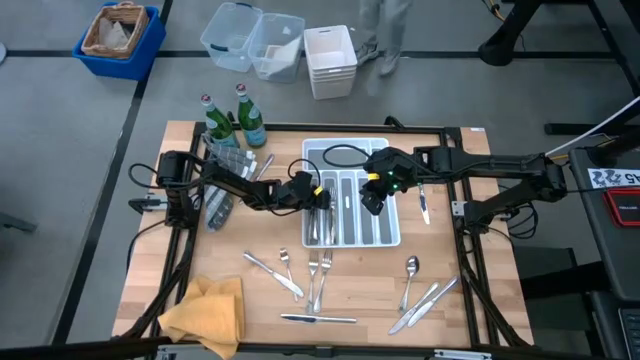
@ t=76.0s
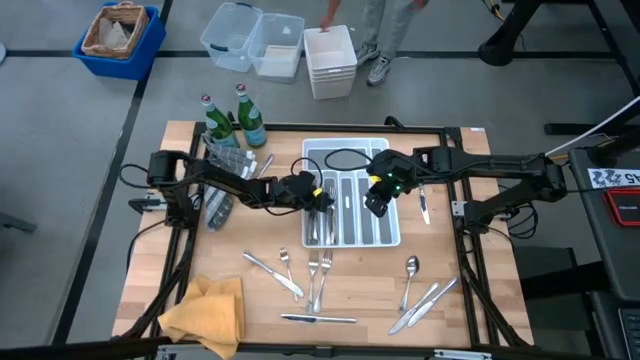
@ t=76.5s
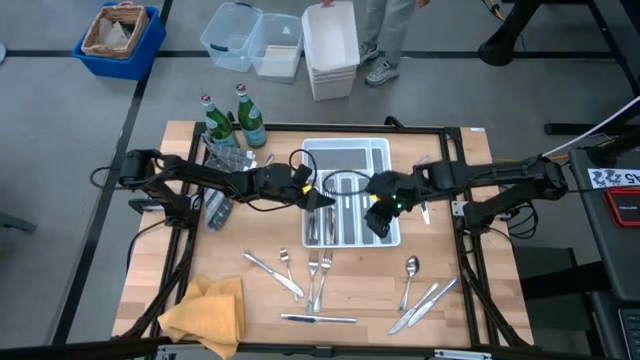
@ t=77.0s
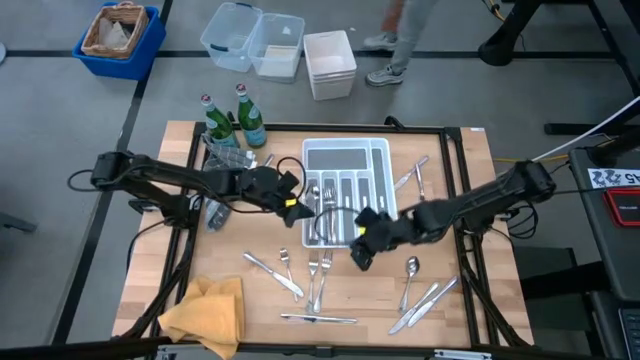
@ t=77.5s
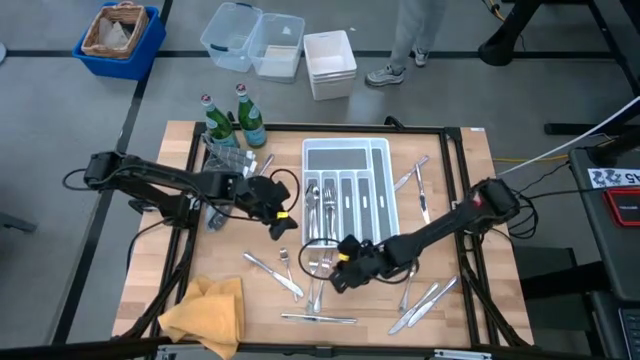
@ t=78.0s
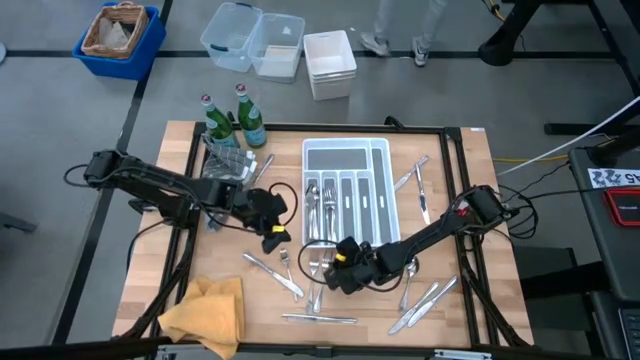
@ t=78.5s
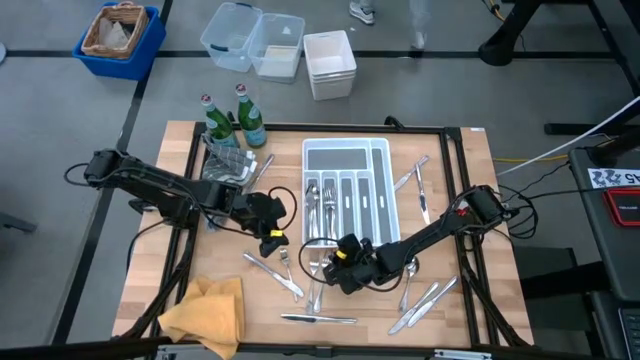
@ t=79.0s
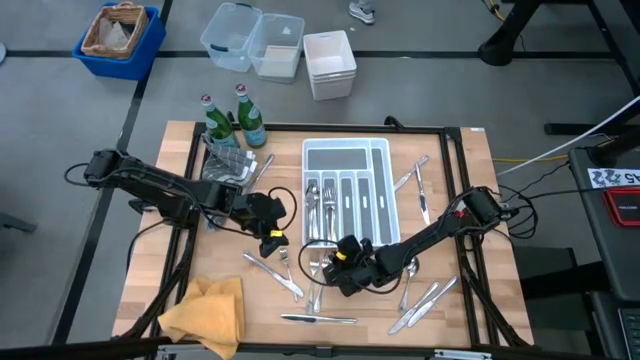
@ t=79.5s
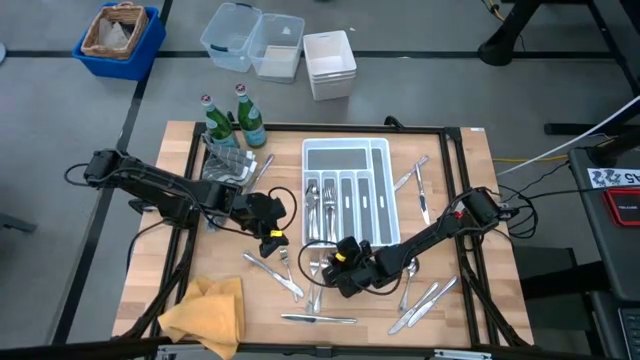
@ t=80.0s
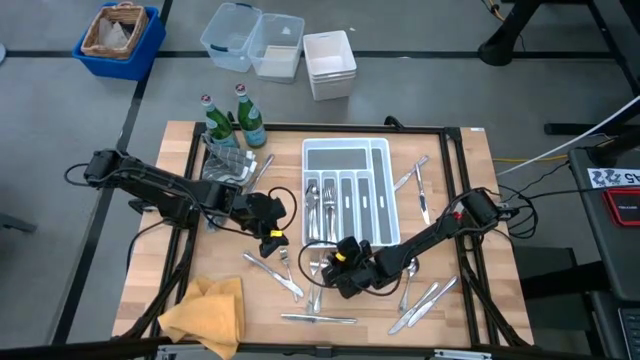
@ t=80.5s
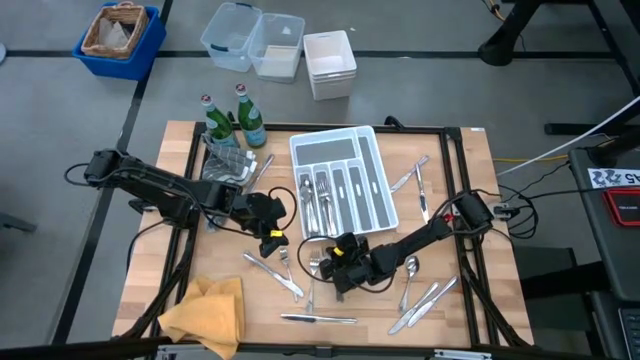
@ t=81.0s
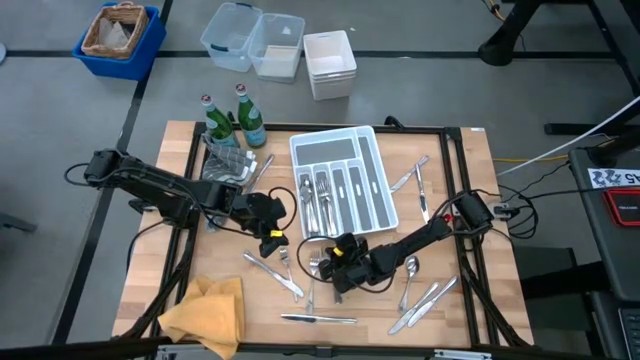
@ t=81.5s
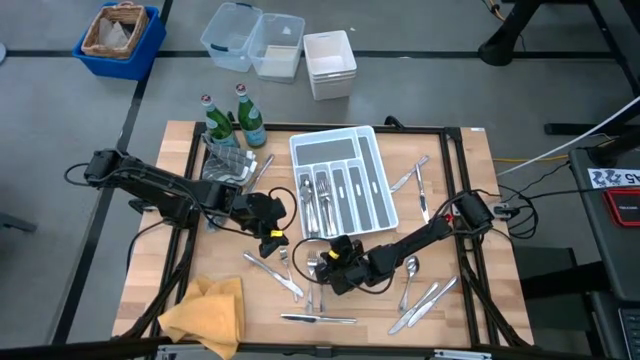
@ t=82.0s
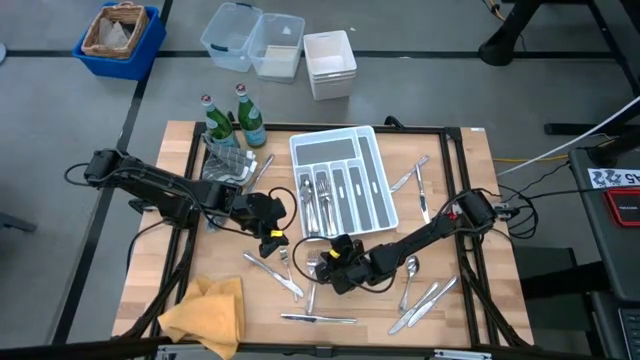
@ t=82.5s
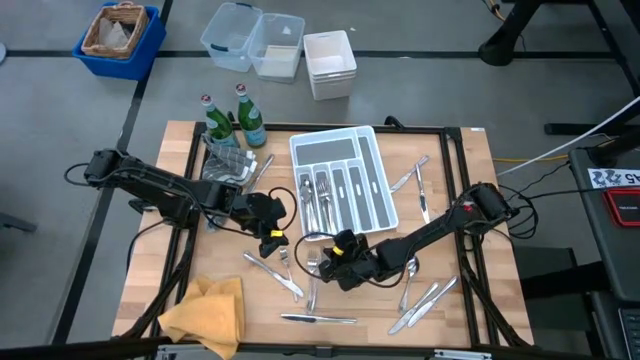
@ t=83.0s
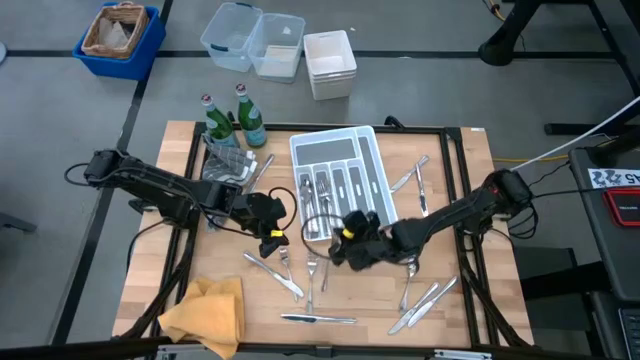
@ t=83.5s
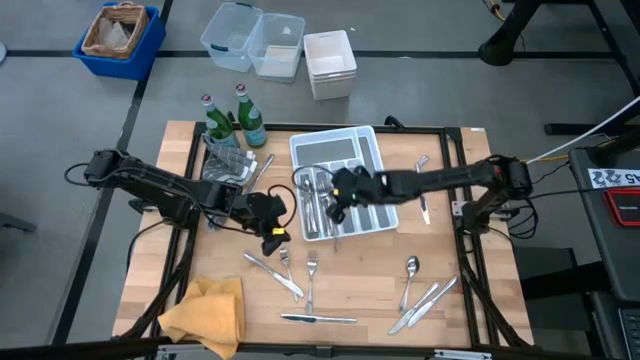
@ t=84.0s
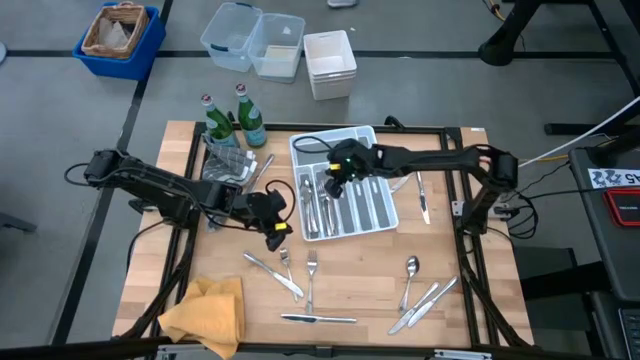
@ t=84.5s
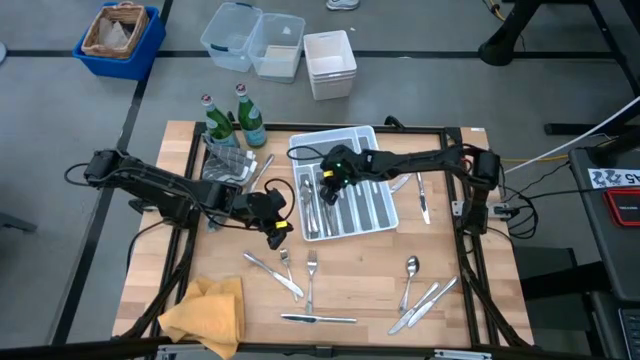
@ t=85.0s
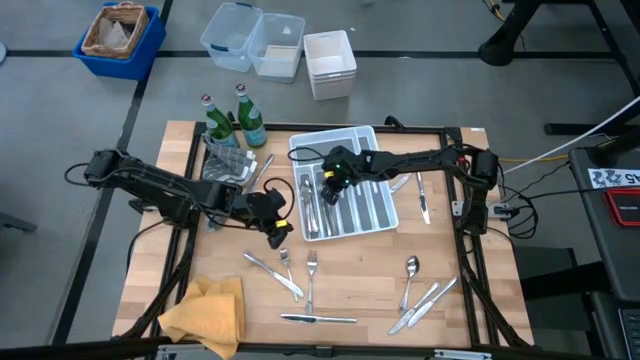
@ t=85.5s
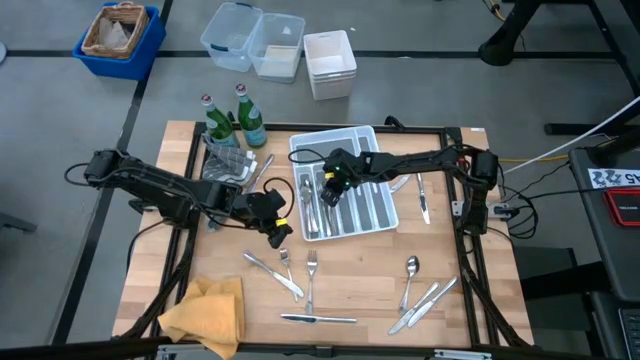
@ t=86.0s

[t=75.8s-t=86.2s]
Task: Sort silverware
Put the silver fork into the silverware tray

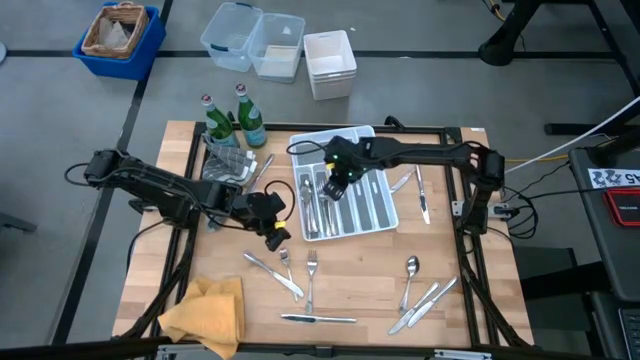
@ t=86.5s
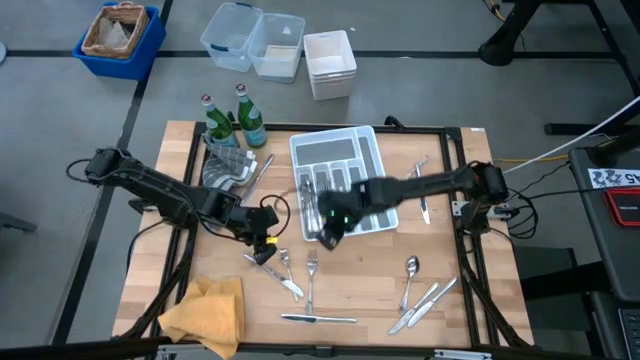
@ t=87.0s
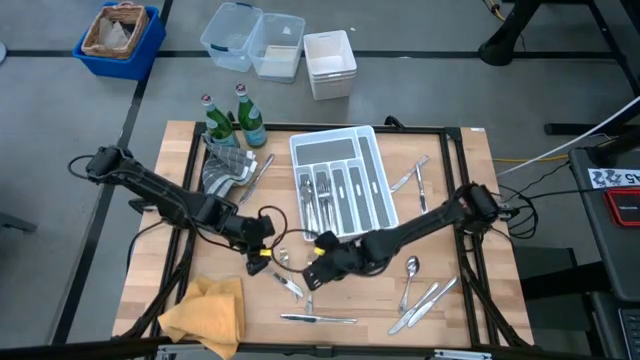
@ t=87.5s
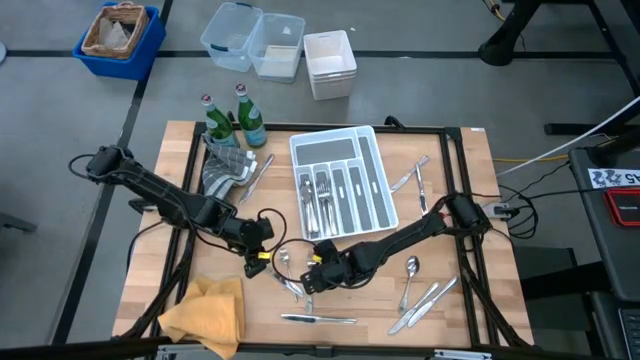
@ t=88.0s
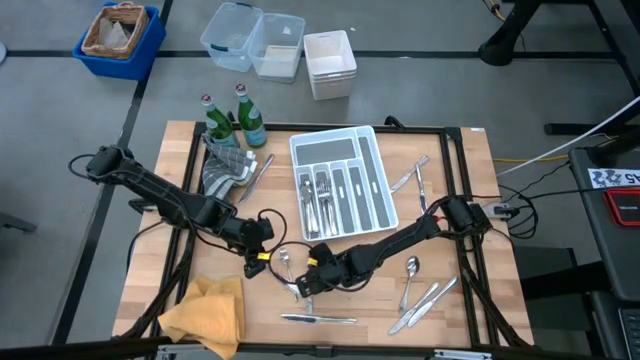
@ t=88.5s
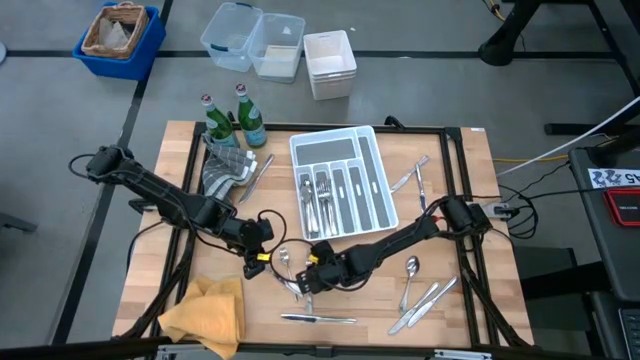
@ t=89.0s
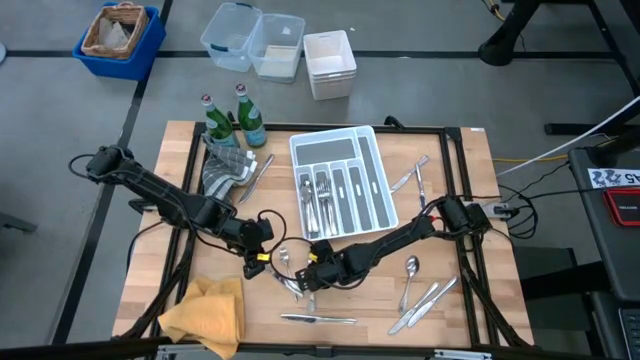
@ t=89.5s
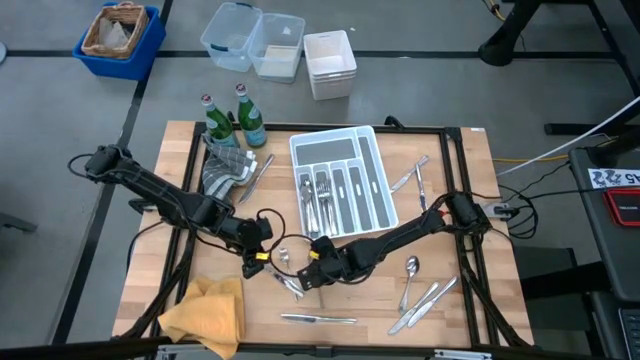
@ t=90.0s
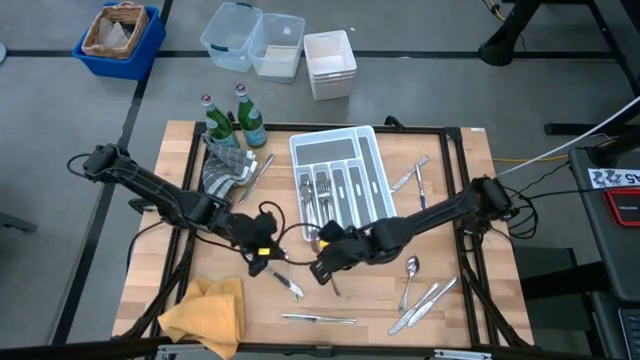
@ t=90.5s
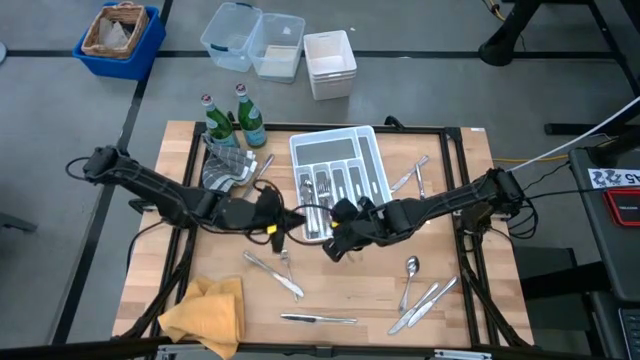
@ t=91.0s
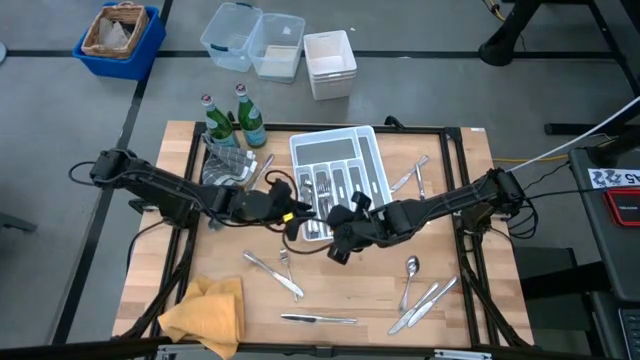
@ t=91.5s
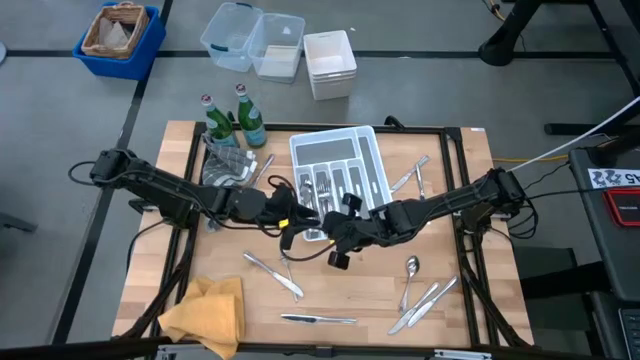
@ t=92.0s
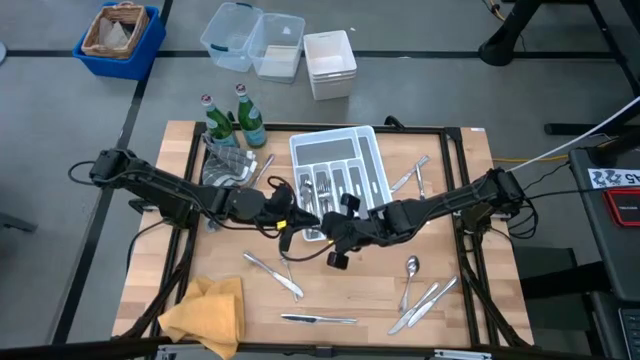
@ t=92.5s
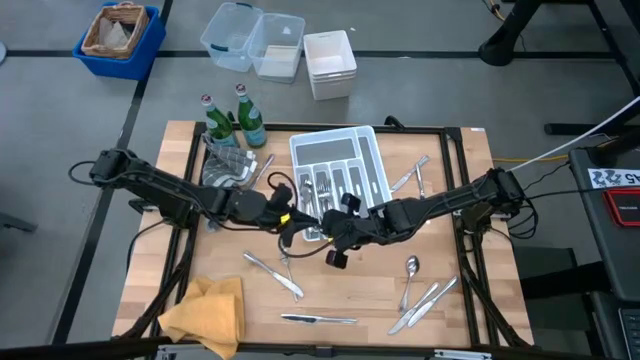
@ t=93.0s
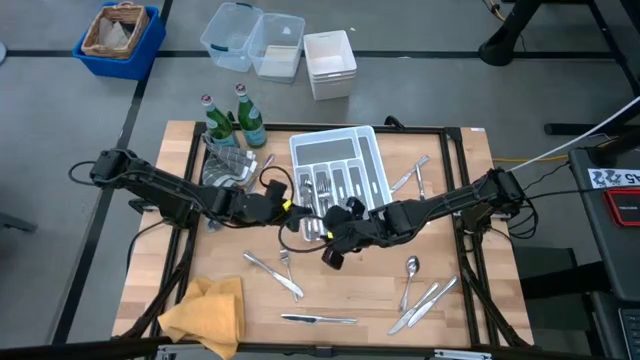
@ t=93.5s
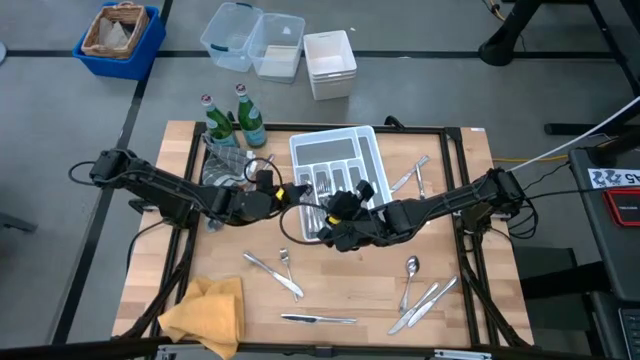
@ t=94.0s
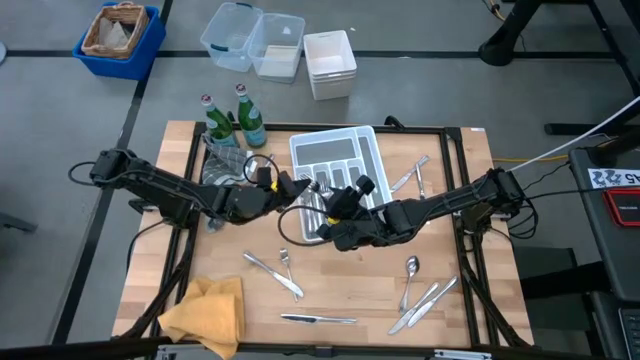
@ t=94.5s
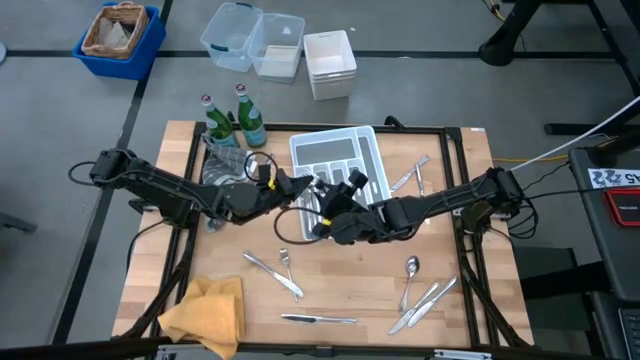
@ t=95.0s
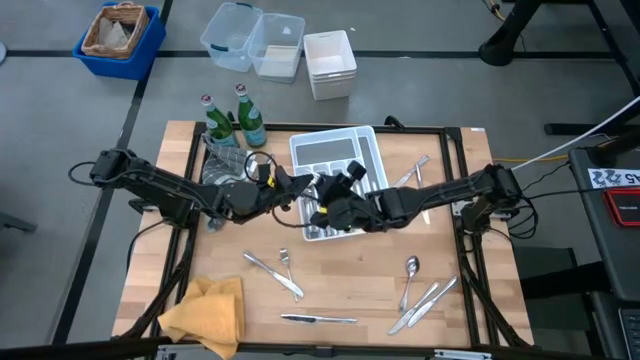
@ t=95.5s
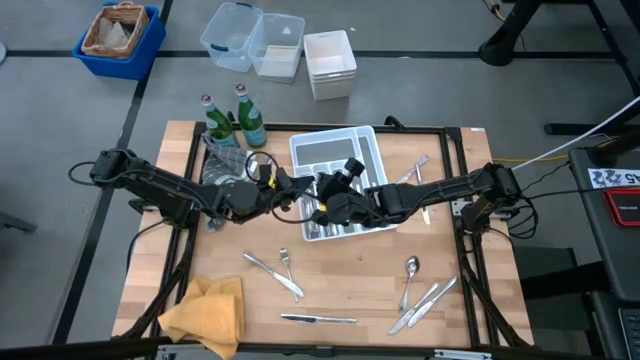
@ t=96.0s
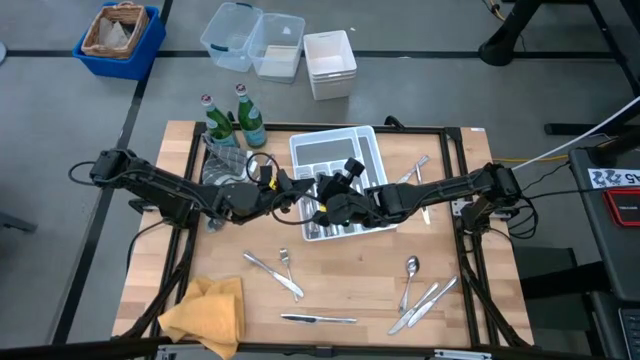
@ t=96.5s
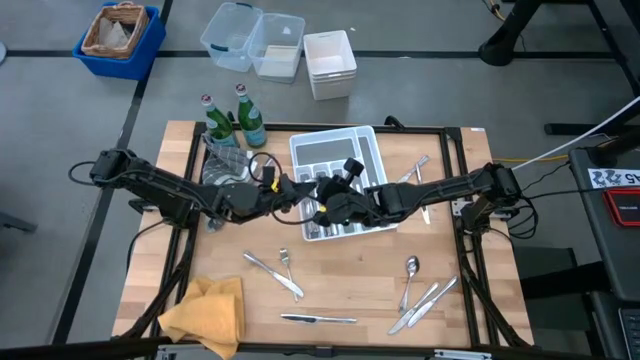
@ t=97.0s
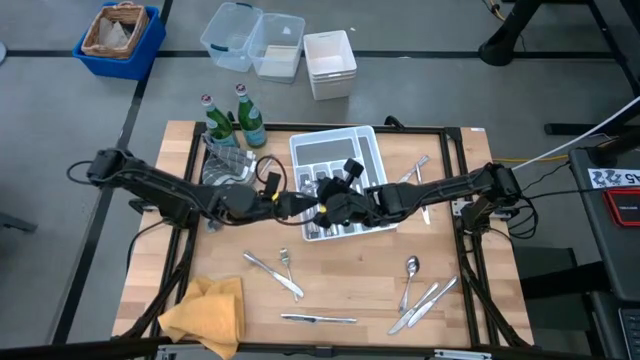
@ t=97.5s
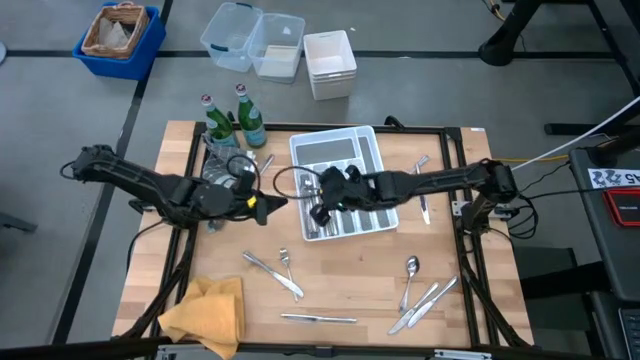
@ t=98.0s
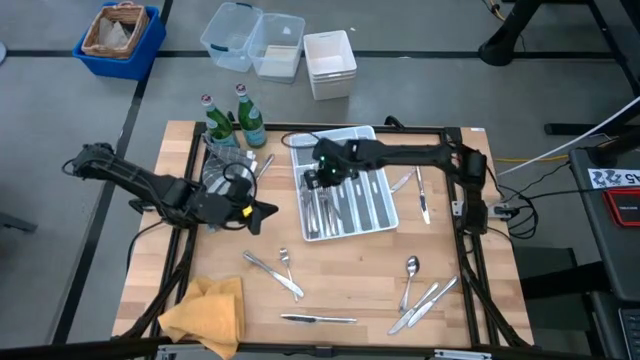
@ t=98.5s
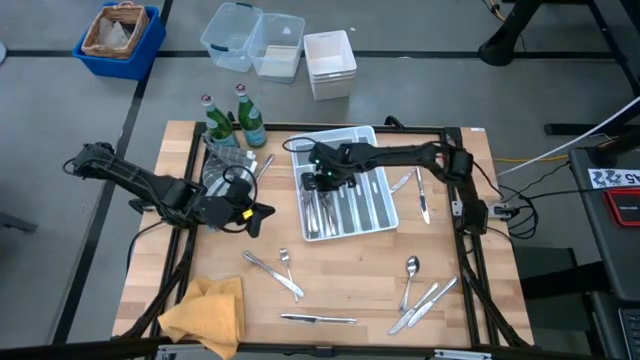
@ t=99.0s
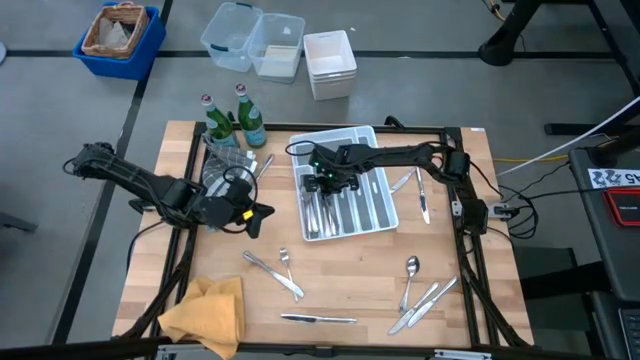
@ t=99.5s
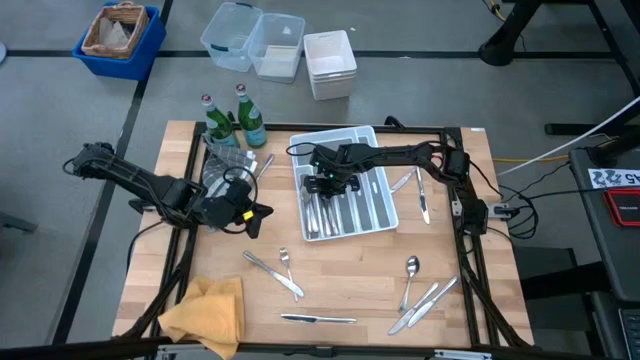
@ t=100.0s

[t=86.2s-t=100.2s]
Put the silver fork into the silverware tray
